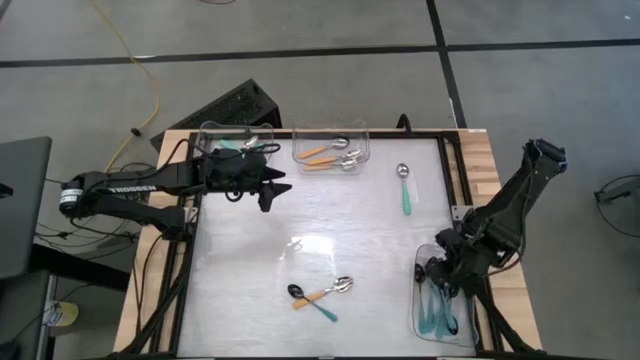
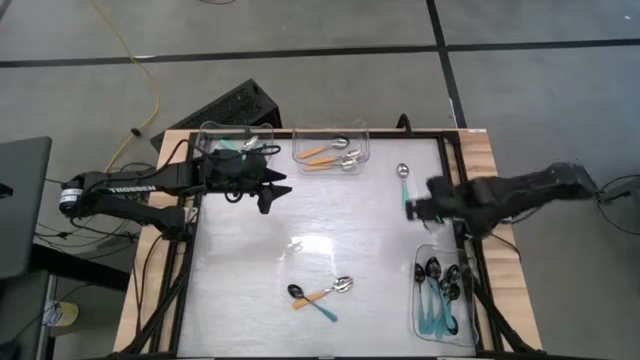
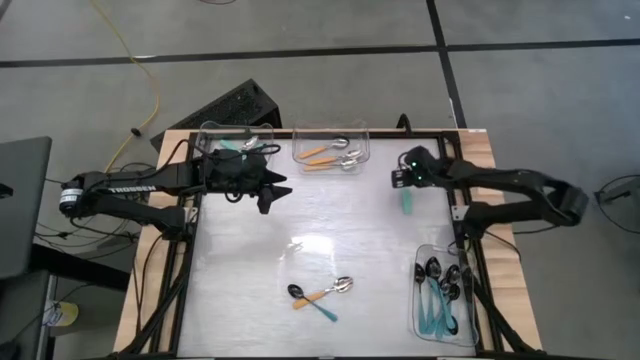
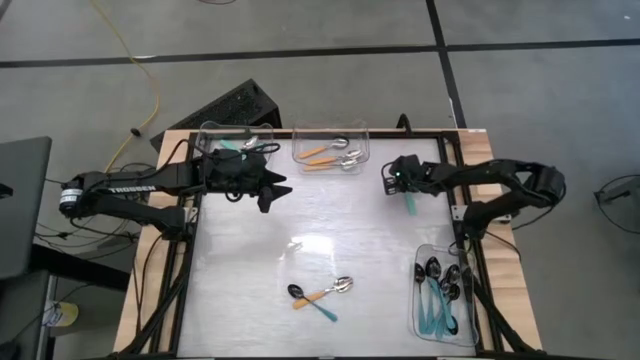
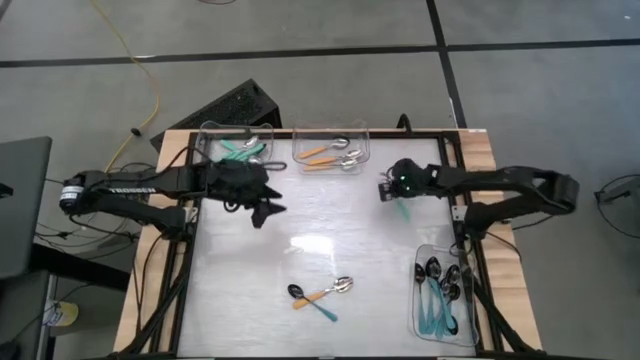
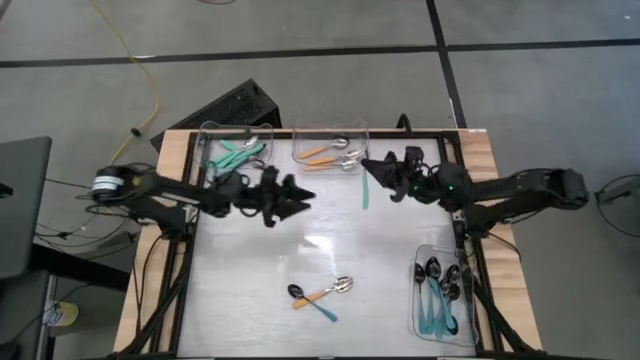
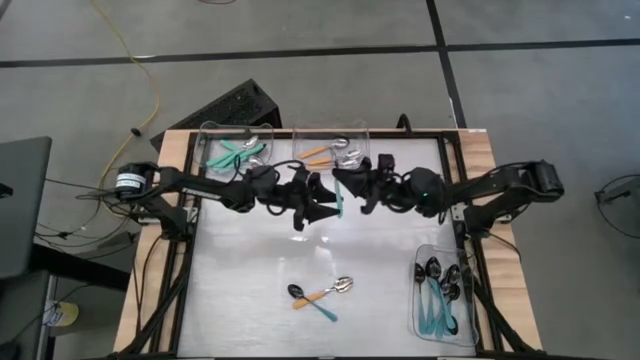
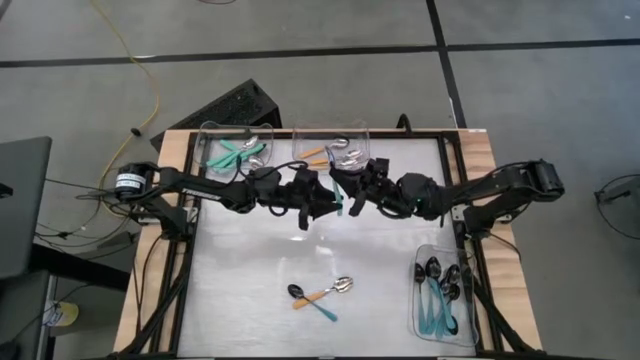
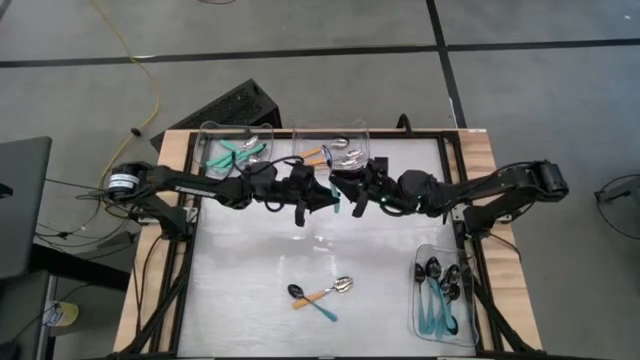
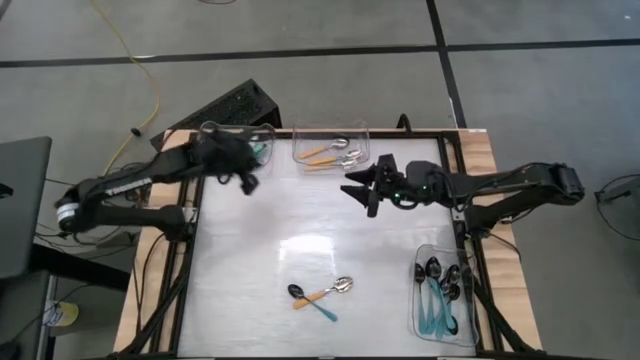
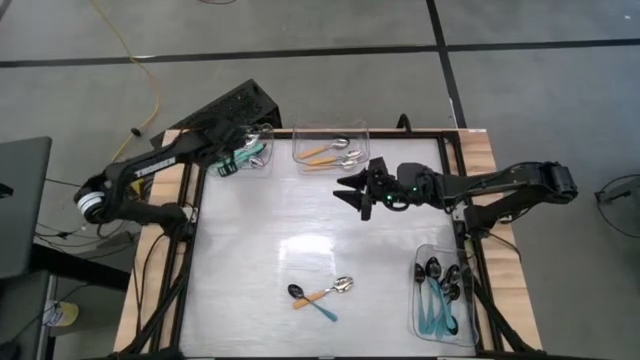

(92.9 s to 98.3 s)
Task: Sort silverware by color (type)
Put the green spoon into the top left transparent bin

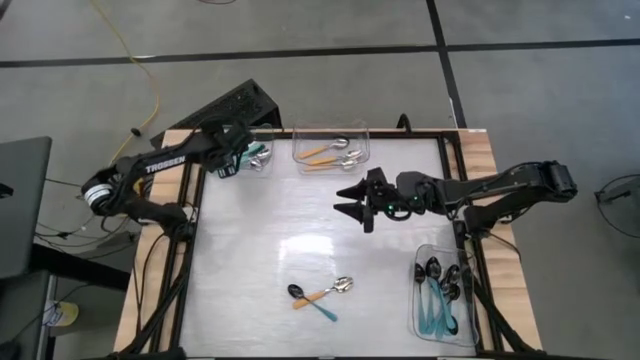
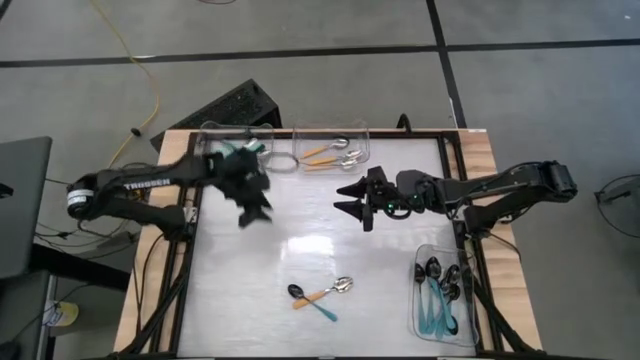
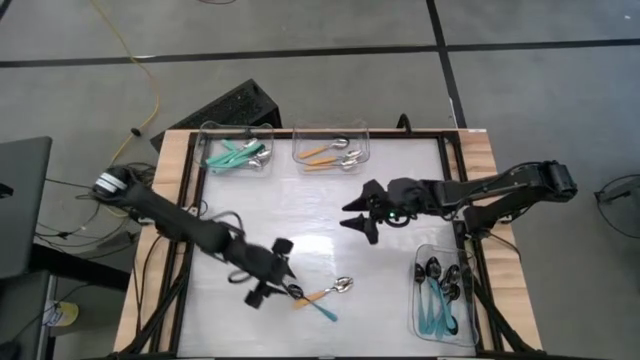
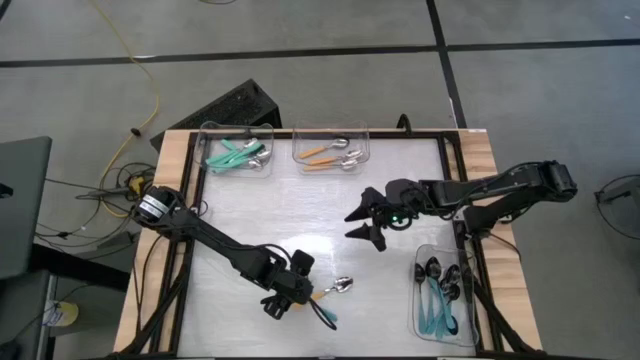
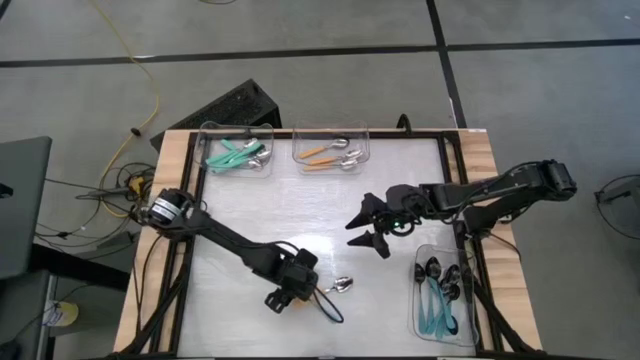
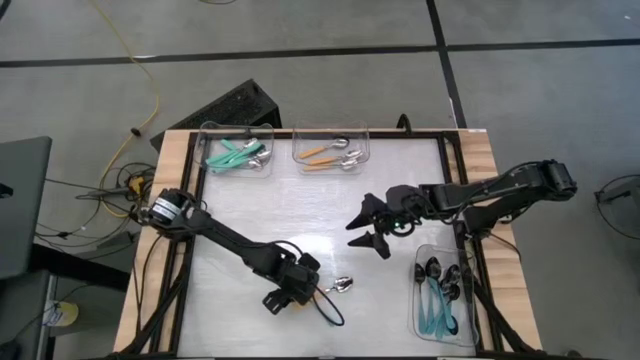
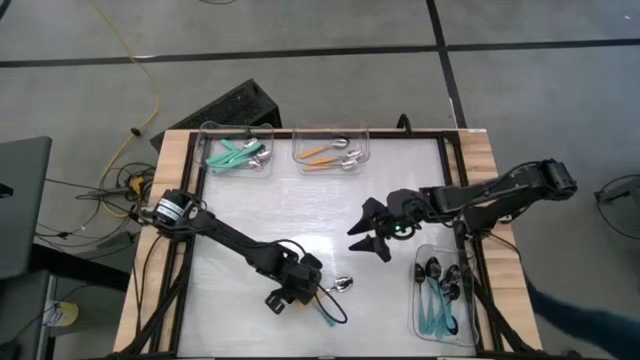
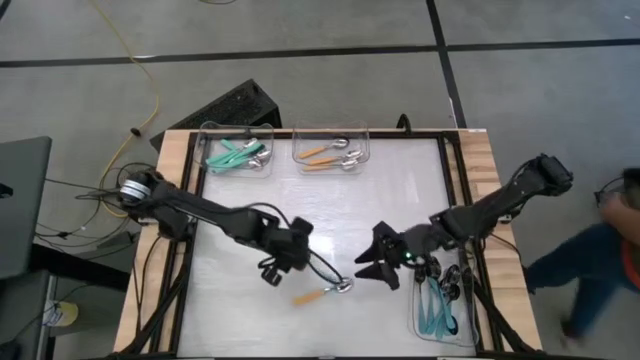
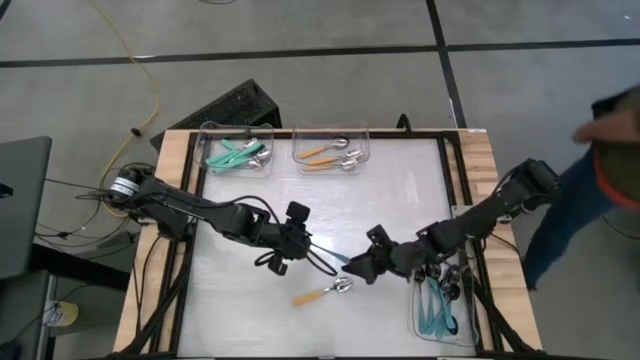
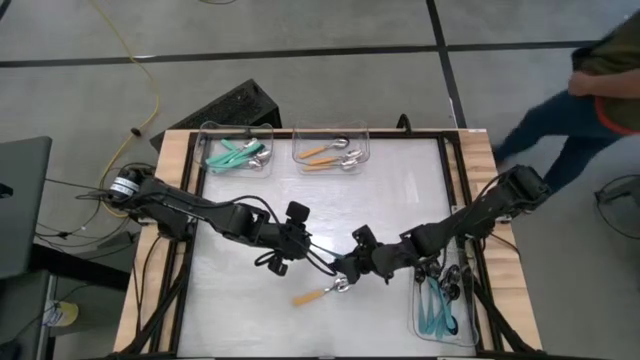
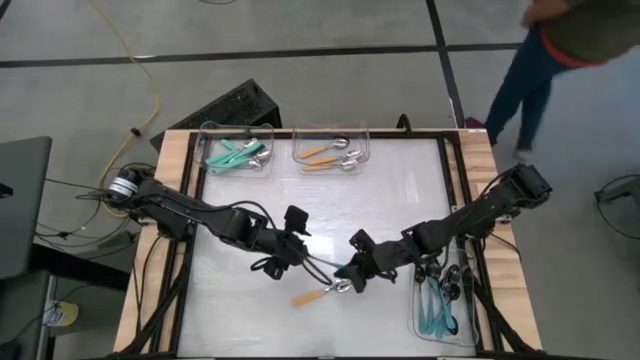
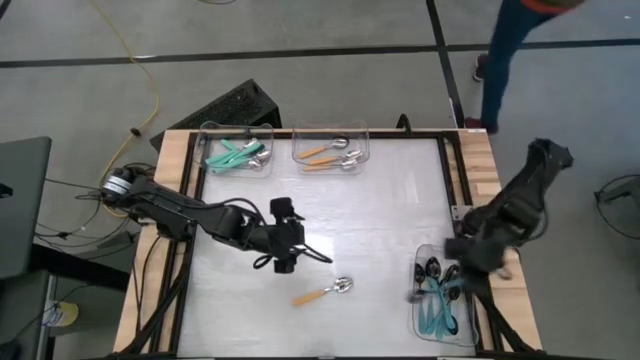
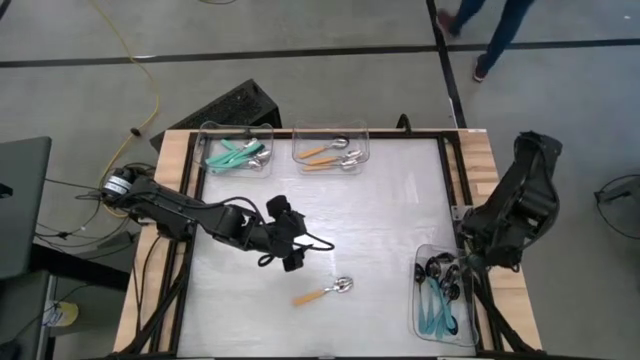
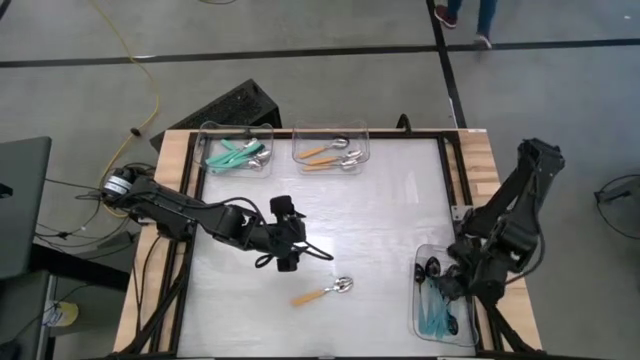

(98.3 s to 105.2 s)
Put the blue spoon into the bottom transparent bin

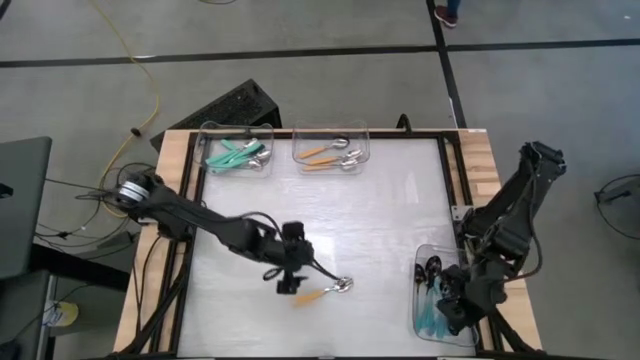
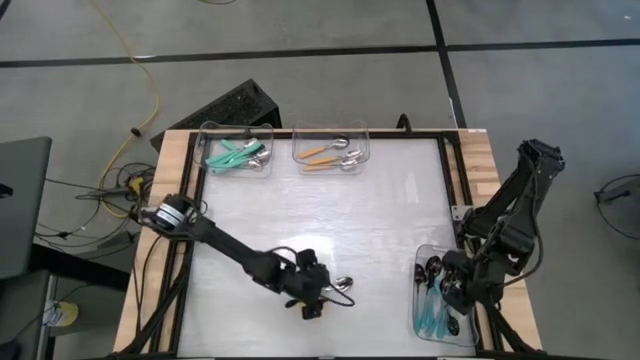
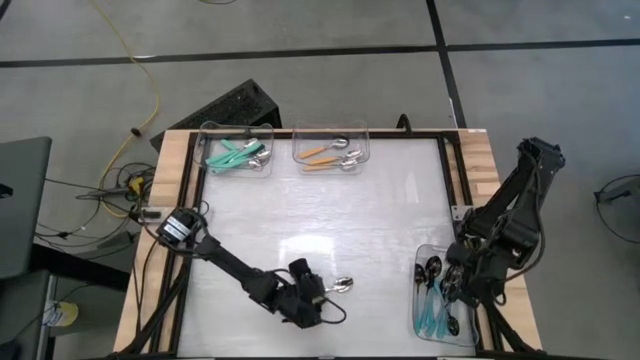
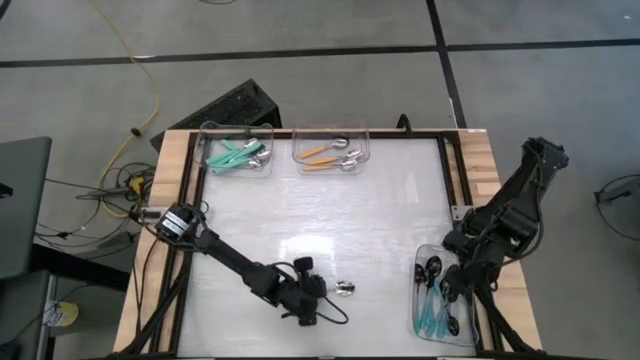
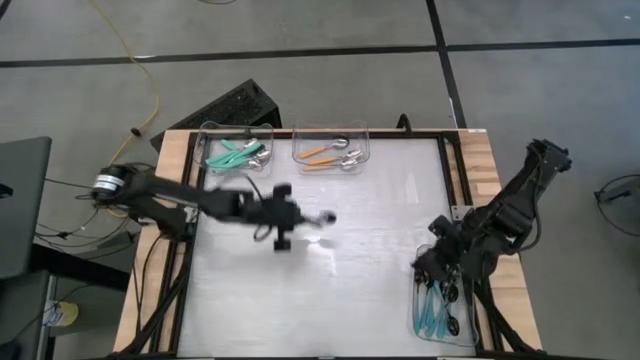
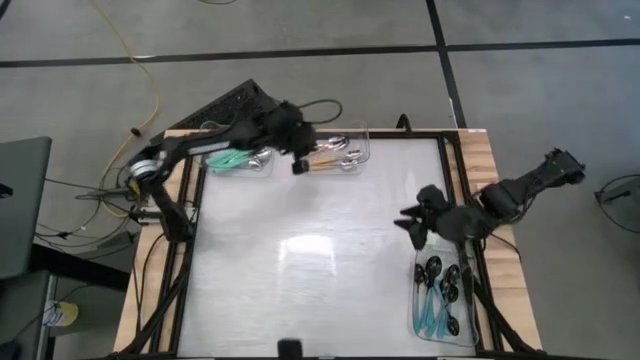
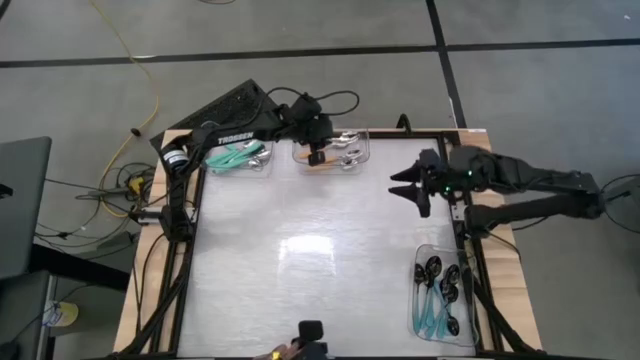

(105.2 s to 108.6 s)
Put the yellow spoon into the top right transparent bin

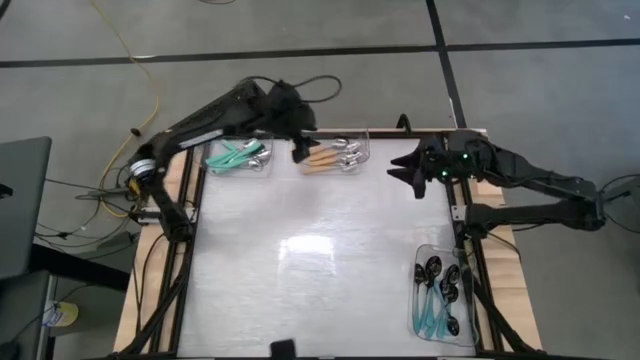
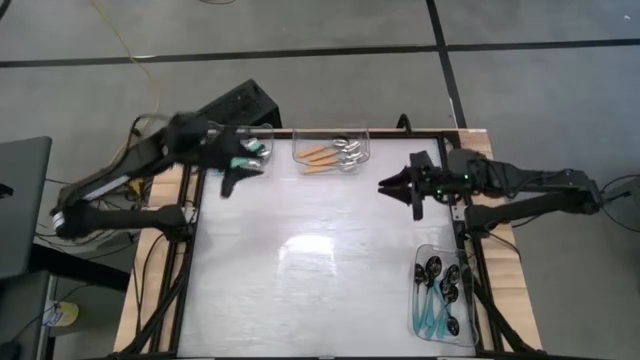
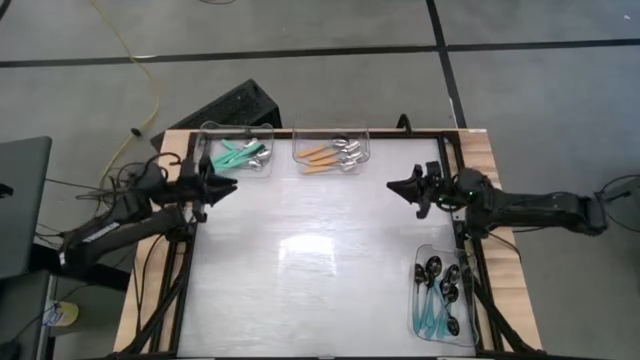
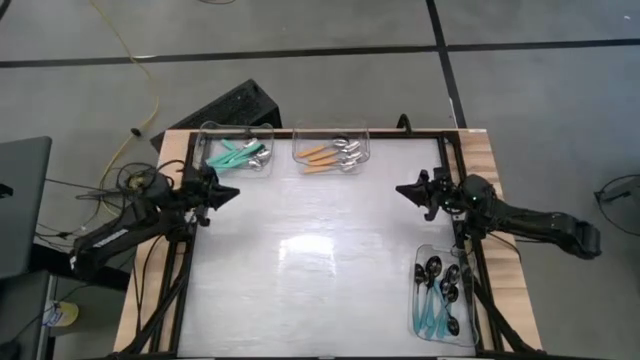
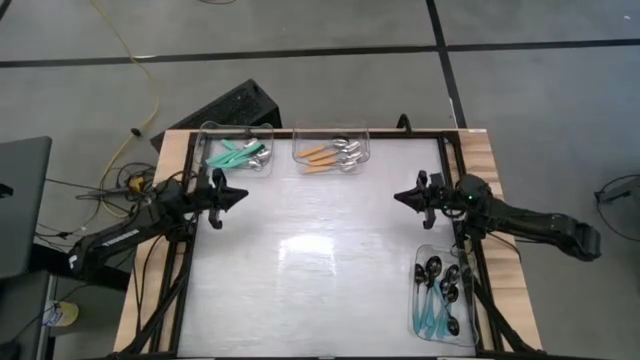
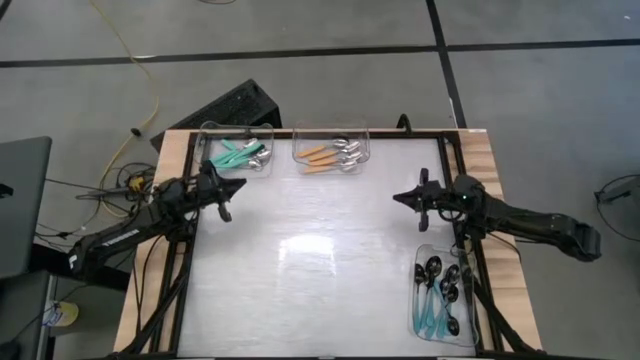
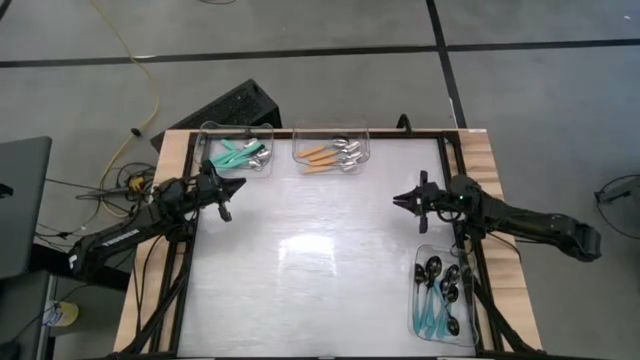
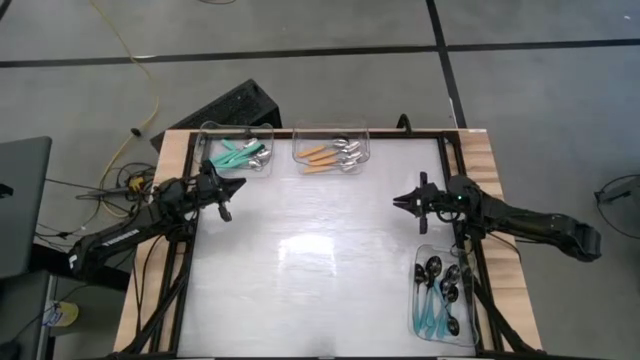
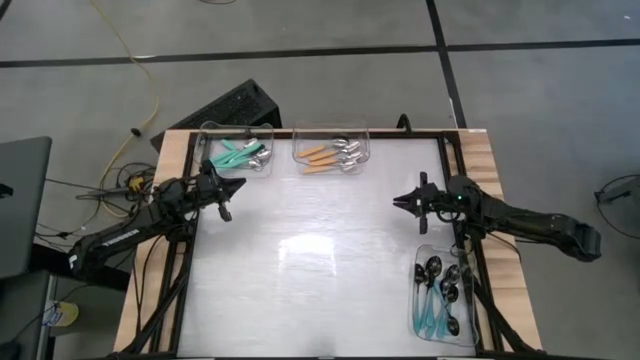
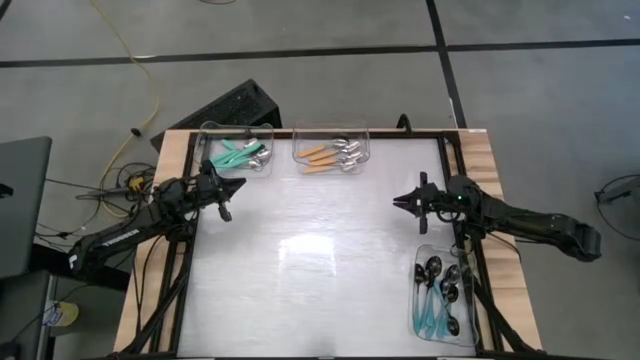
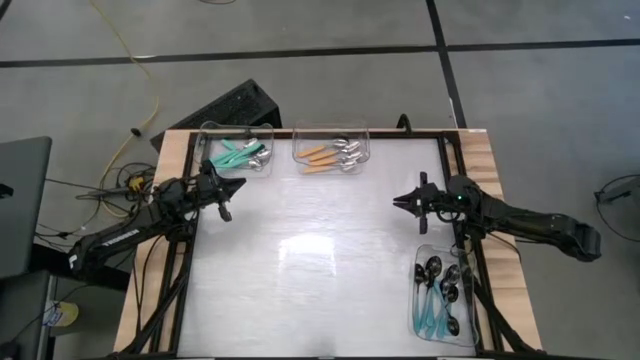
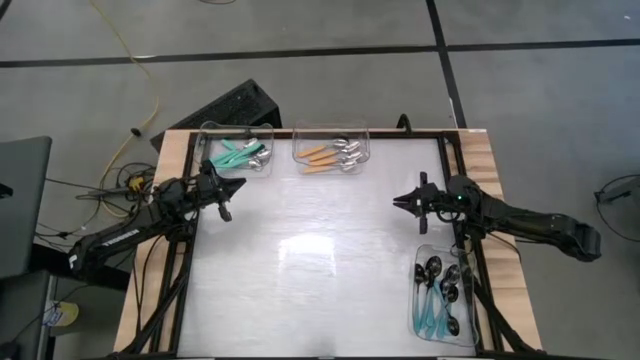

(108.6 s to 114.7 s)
Return to Home Position
